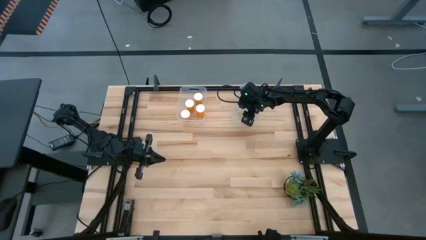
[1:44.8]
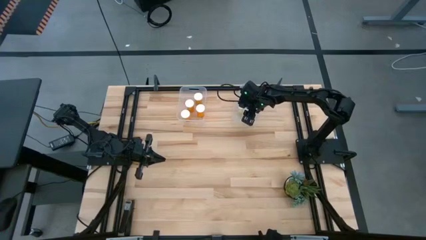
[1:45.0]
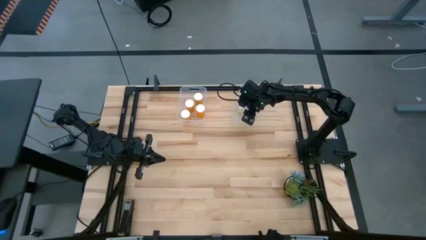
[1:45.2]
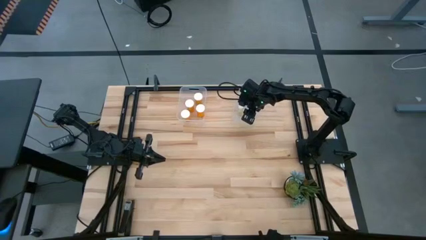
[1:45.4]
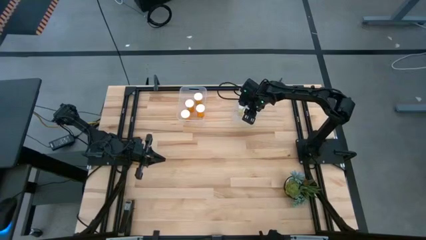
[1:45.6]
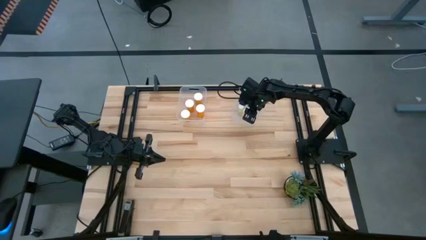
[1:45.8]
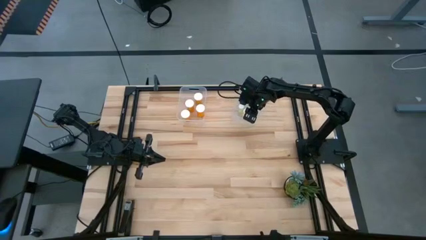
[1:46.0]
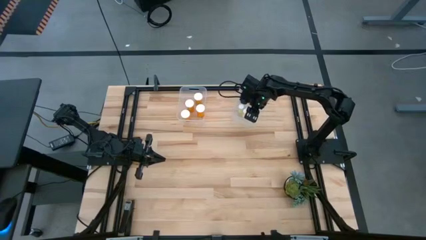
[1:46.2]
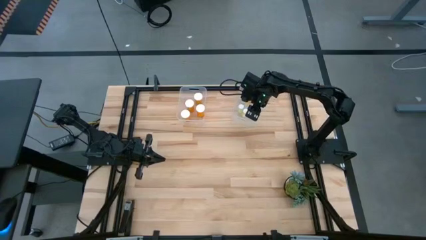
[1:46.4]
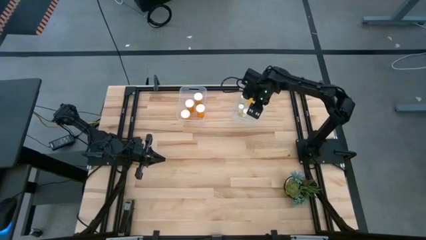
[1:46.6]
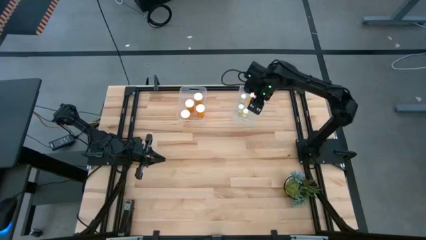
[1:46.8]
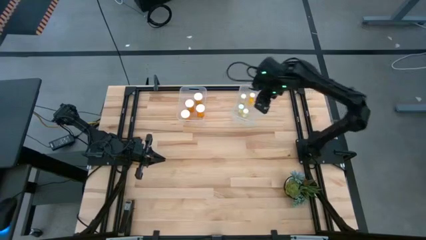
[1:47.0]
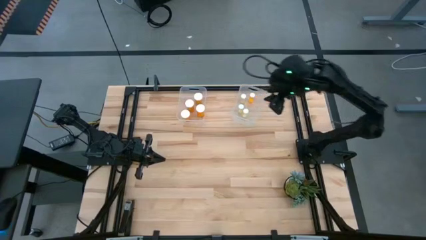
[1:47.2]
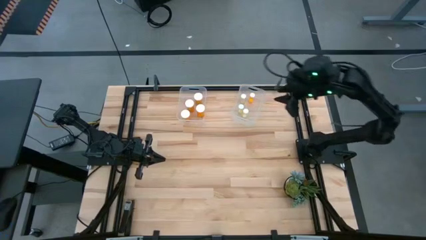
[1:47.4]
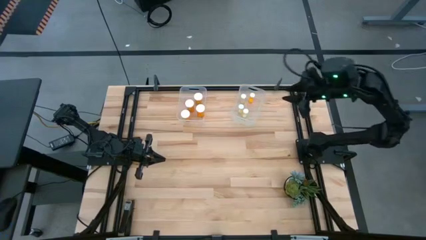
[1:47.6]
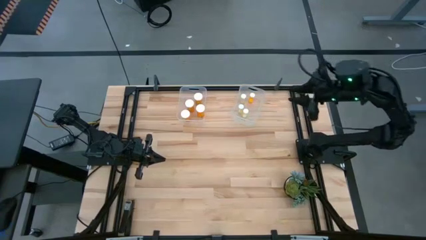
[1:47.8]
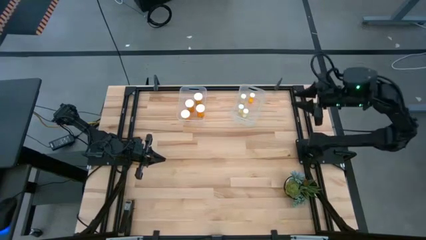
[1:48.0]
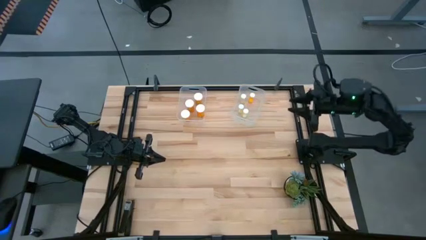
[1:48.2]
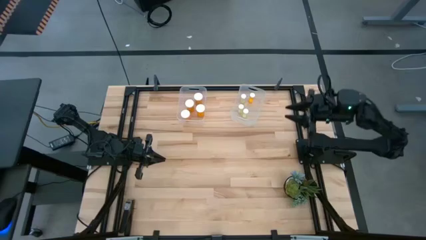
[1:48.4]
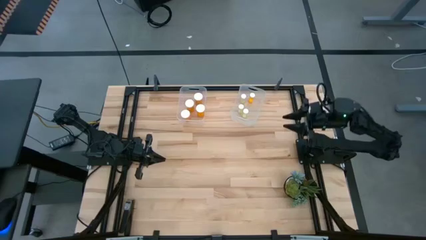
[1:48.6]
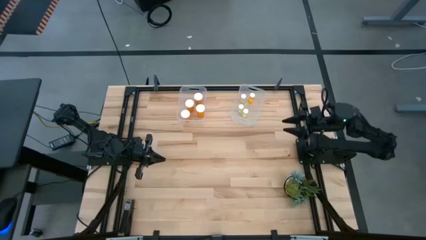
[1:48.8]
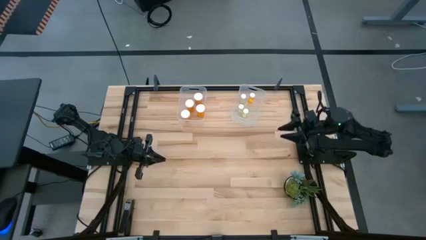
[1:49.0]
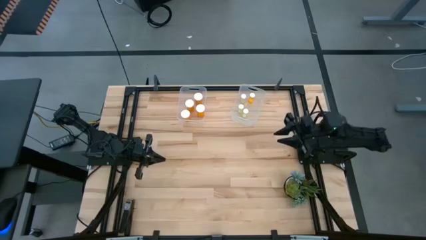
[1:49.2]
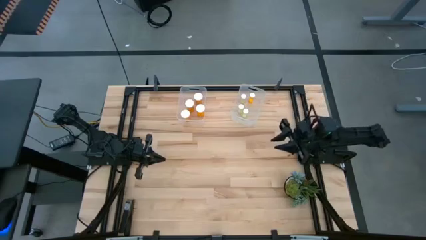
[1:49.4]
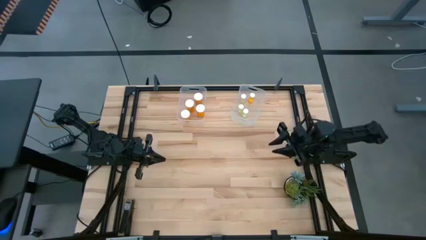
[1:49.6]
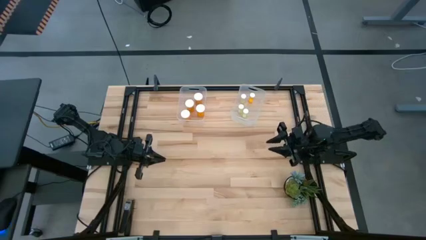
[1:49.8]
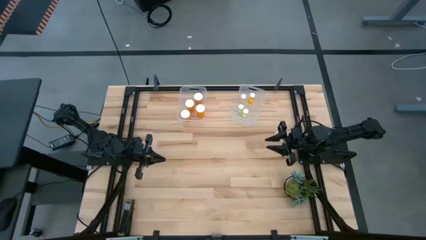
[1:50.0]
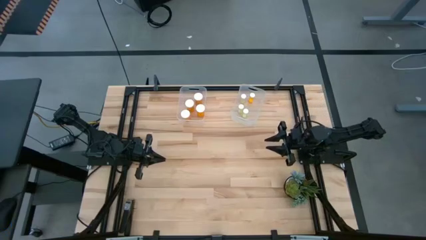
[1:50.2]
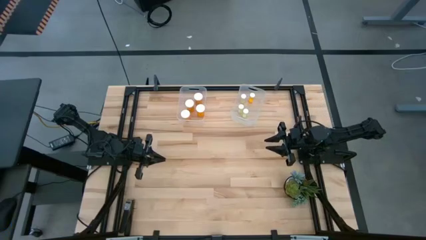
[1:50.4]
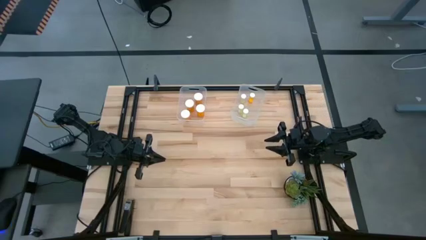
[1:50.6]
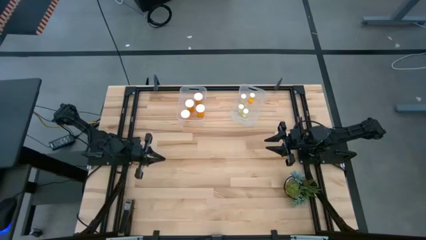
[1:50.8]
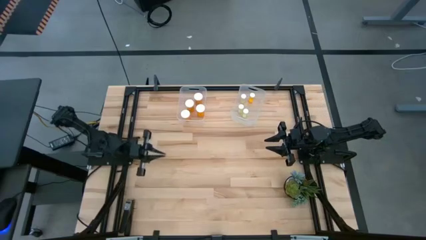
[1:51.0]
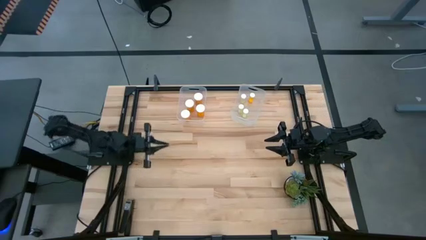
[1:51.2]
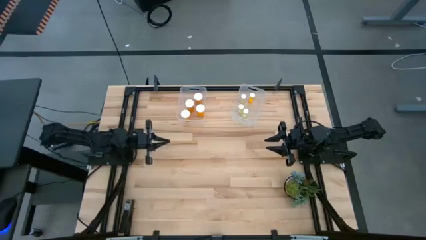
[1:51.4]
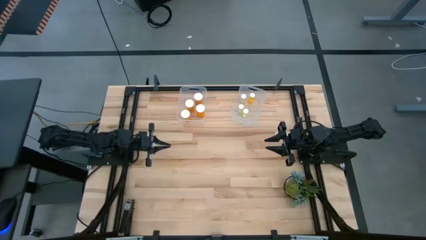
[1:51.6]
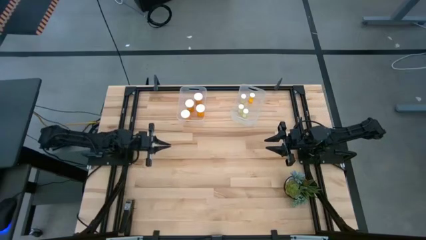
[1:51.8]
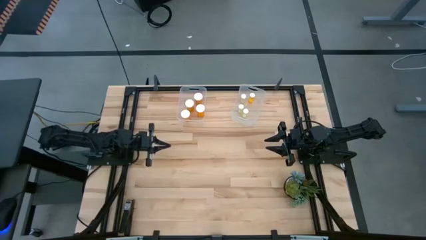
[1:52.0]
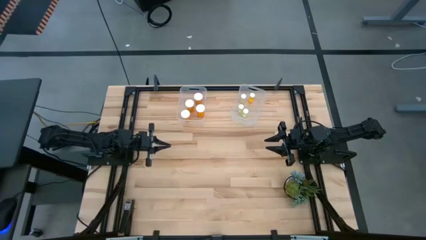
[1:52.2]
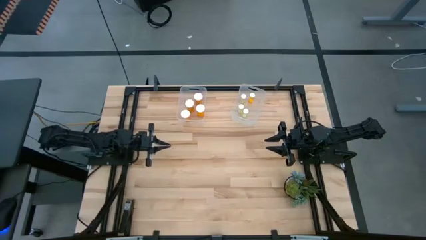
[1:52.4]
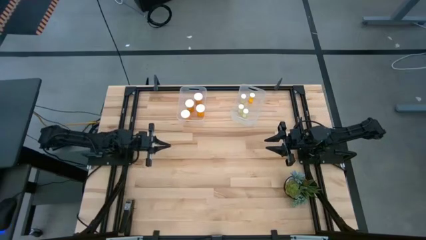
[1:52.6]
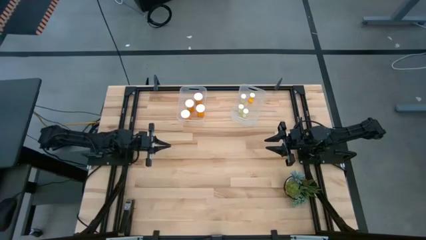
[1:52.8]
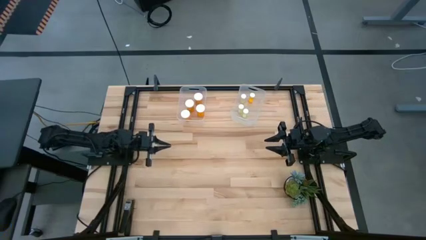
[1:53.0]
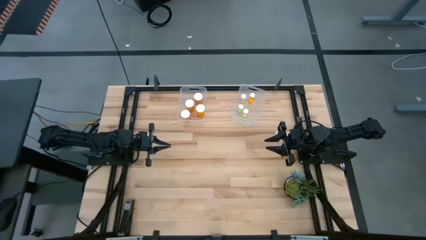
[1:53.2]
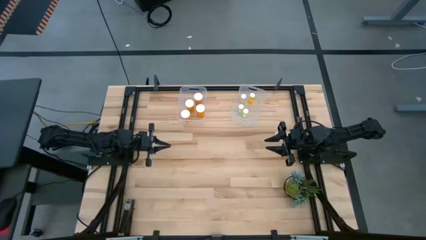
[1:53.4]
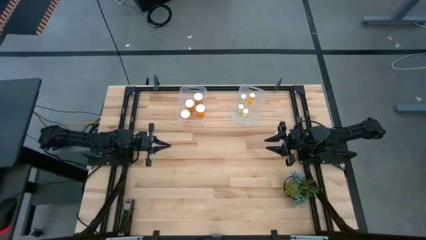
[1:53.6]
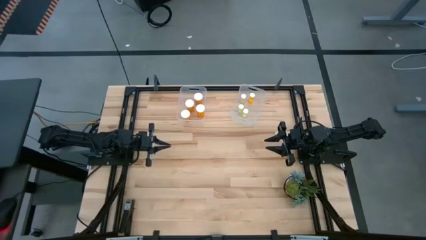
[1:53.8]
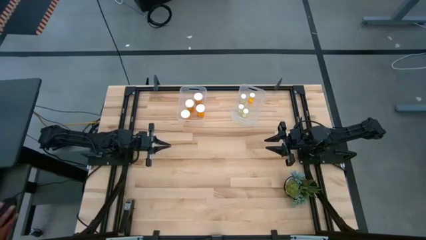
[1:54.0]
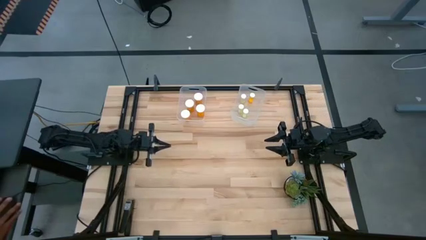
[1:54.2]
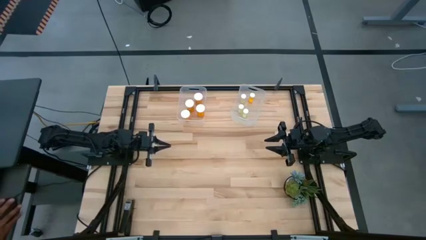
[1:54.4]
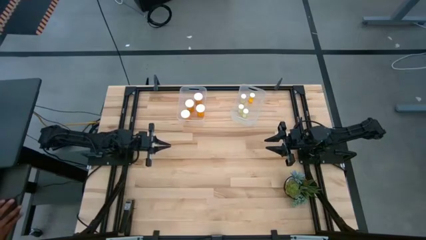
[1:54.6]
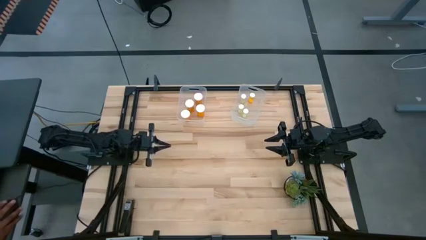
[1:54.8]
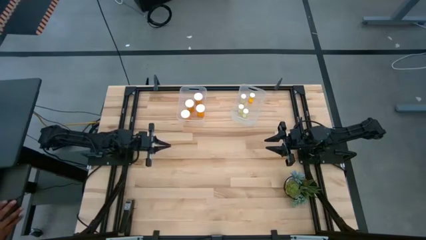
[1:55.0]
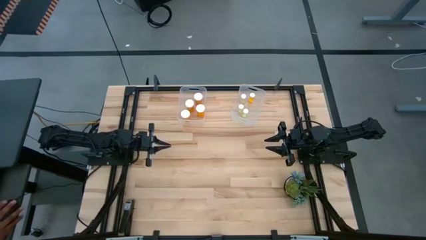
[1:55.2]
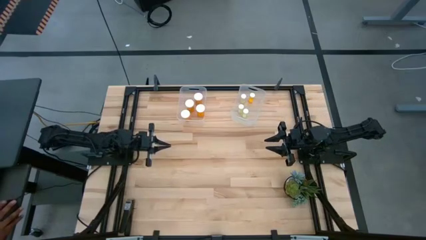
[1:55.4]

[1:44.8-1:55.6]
Task: Pick and place medicine bottles into bin by pill shape (circle, oval)
Return to Home Position
